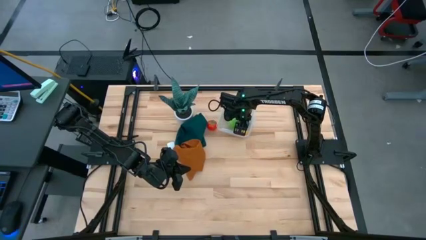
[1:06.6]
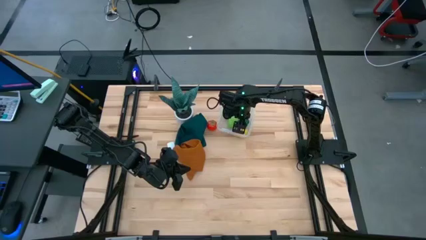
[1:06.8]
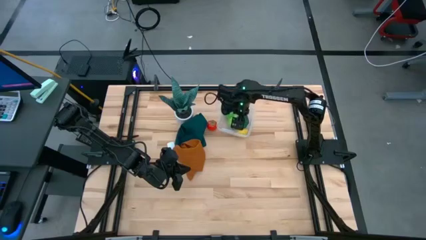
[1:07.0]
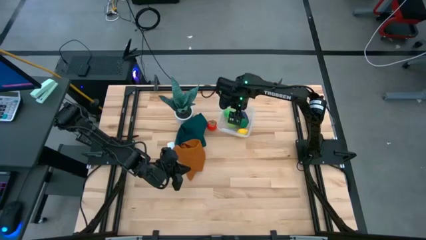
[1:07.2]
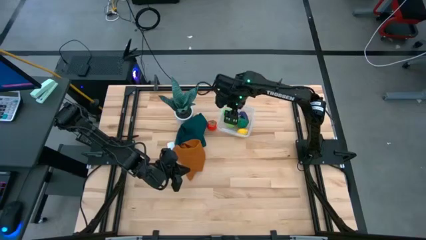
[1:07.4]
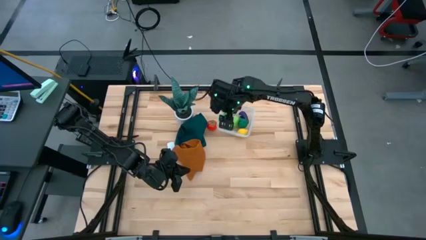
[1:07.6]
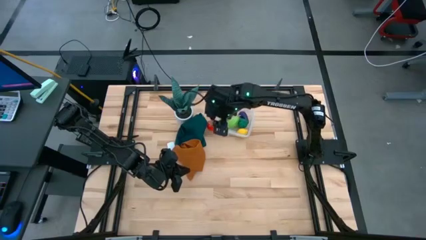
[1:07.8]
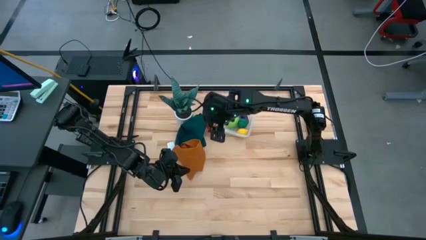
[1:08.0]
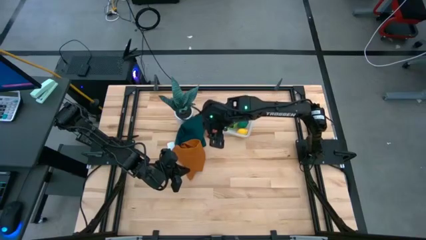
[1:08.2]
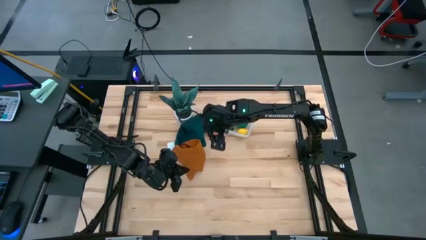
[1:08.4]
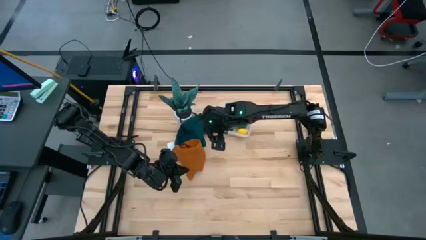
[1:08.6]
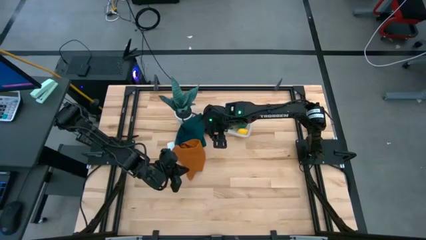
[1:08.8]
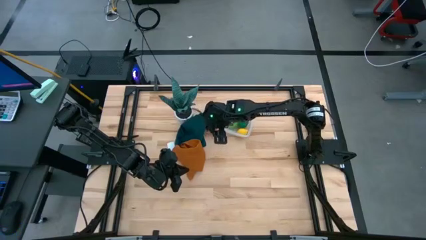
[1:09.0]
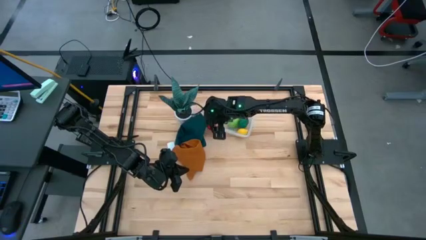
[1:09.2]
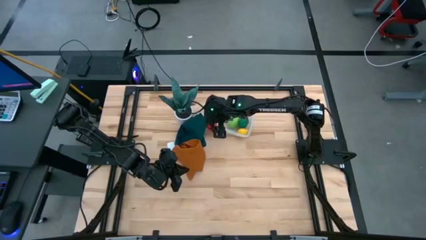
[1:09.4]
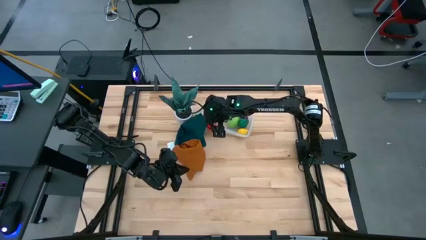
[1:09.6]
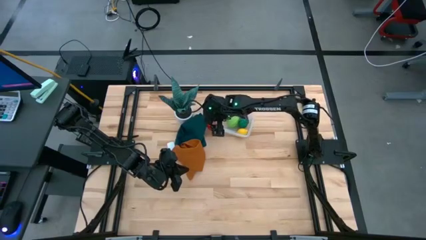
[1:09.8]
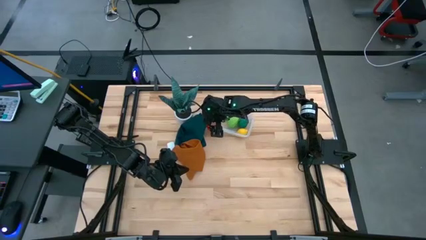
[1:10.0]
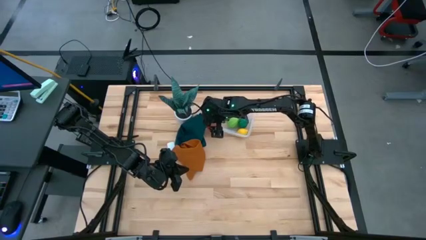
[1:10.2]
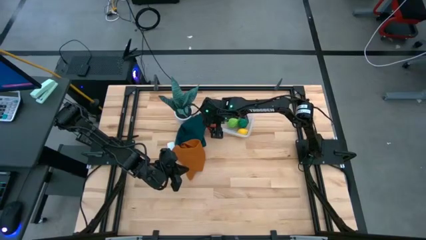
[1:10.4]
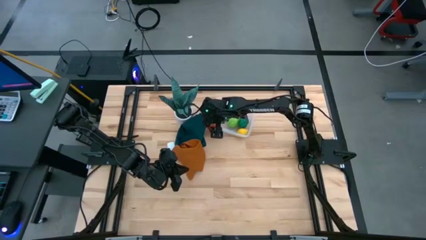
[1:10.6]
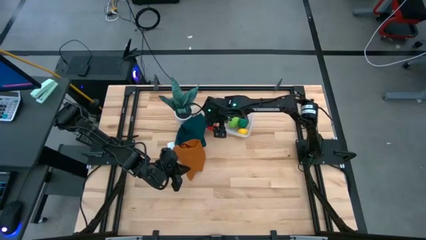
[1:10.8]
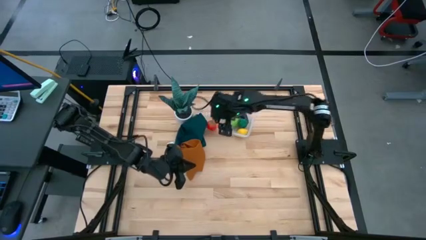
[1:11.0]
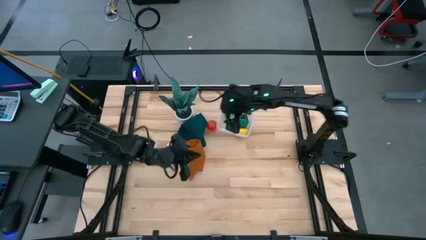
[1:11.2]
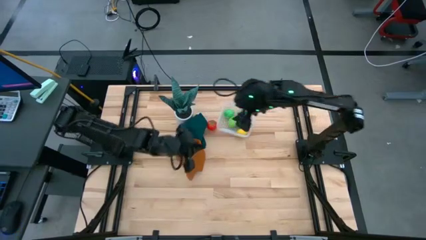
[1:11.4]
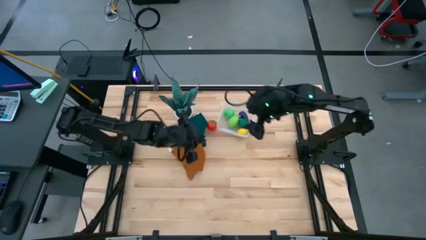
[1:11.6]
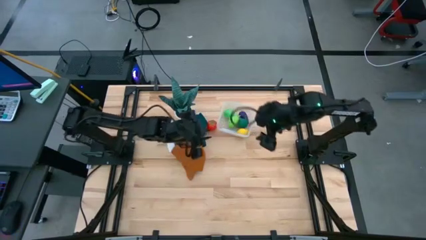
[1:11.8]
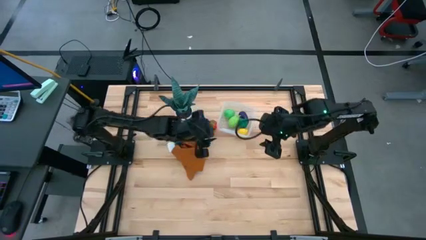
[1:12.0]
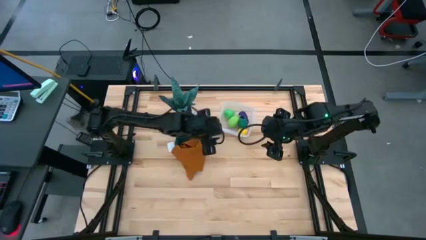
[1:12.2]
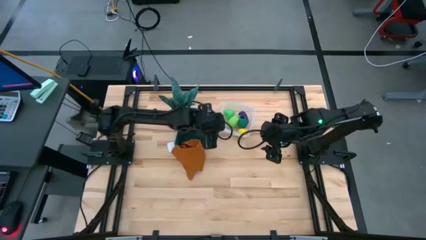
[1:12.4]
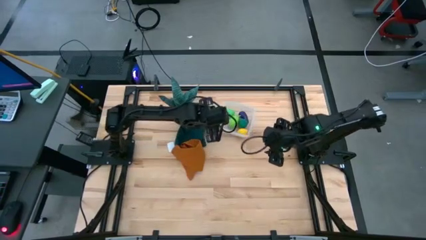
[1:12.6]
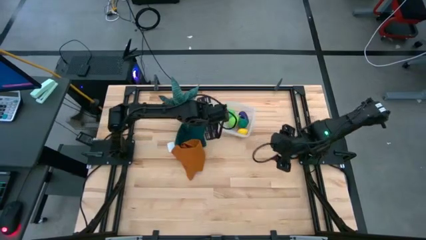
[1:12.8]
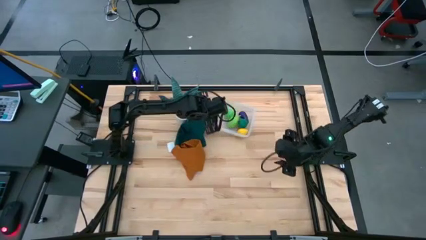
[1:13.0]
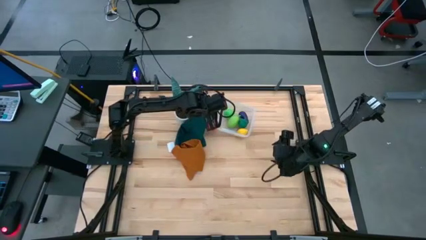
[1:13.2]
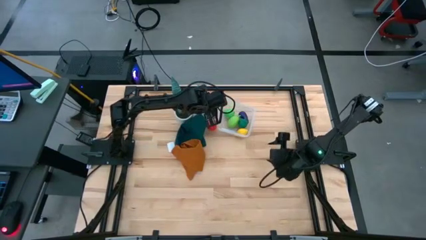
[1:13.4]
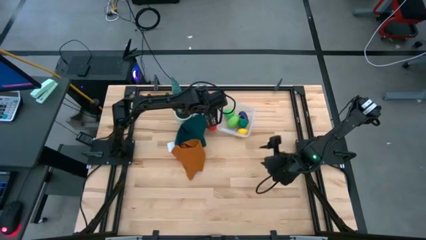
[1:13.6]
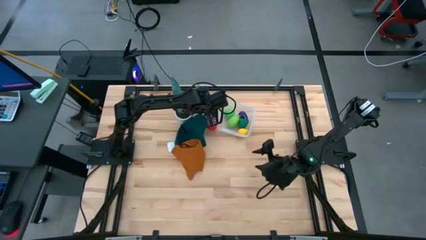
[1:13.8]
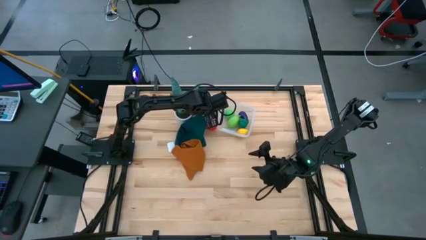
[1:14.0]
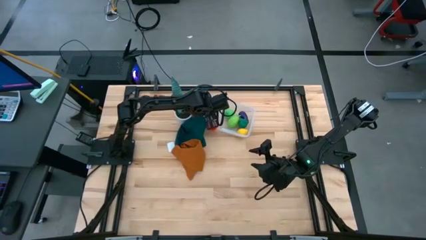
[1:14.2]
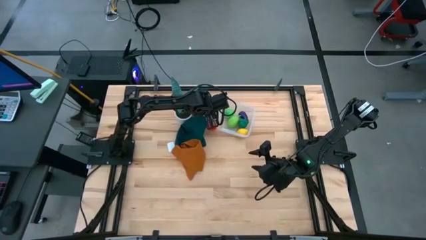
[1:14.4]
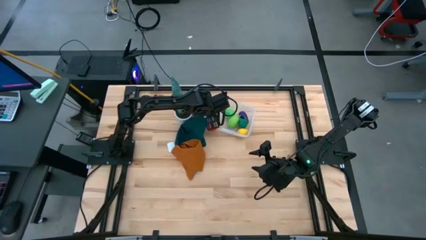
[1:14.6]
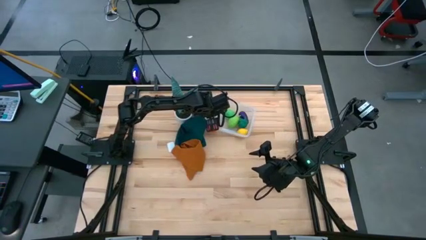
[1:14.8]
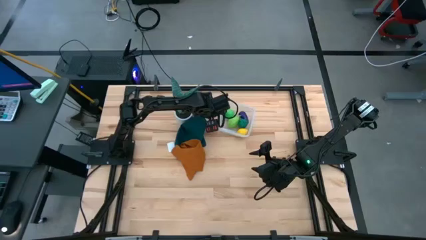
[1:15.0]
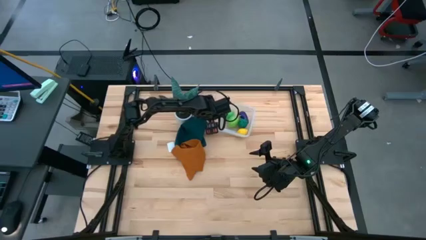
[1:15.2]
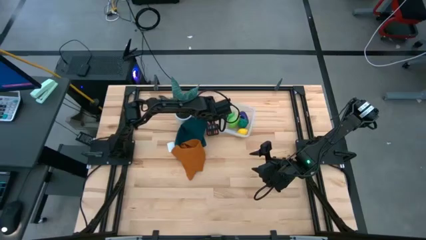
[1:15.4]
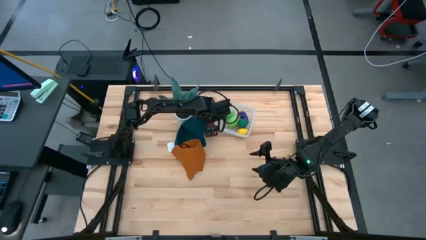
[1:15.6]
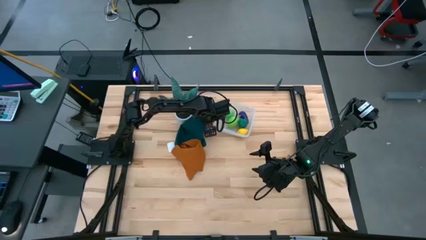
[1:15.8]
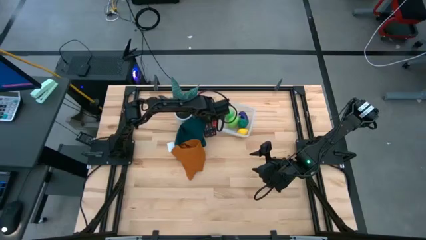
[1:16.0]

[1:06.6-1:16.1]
Task: Pick and placing Produce into tupperware
Put the red tomato into the transparent bin

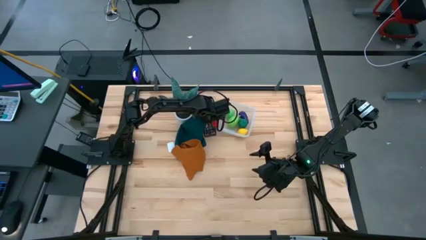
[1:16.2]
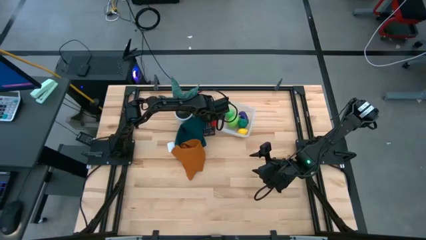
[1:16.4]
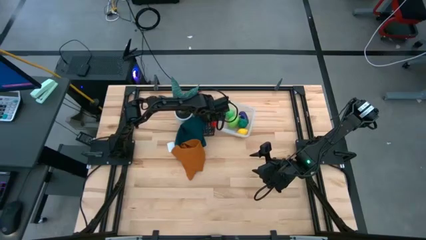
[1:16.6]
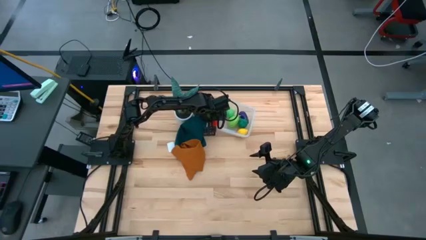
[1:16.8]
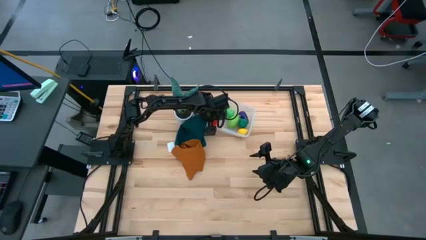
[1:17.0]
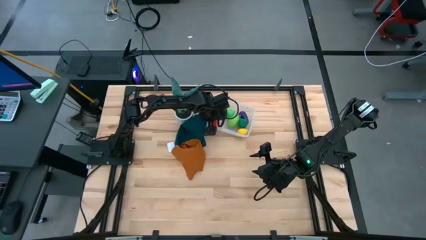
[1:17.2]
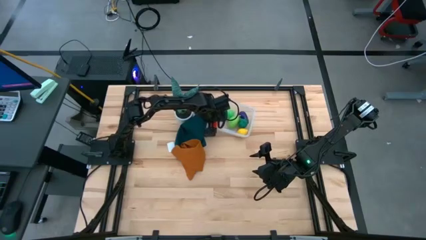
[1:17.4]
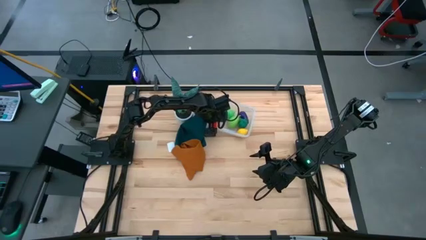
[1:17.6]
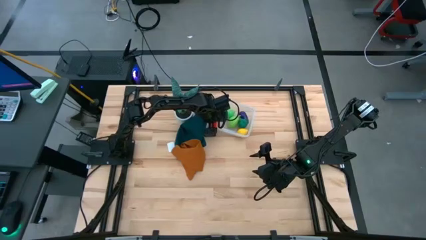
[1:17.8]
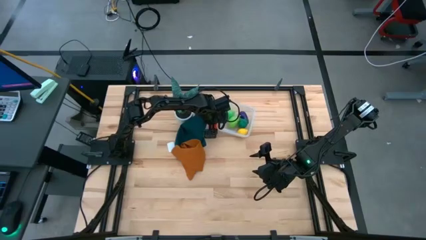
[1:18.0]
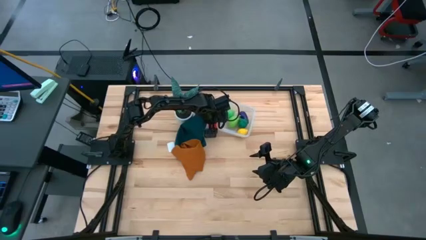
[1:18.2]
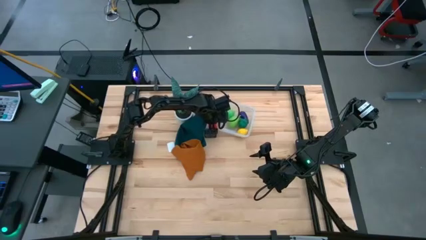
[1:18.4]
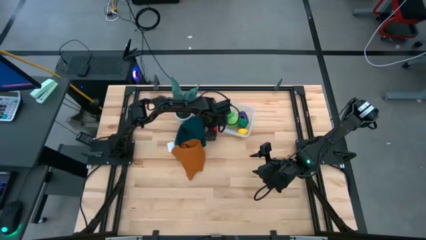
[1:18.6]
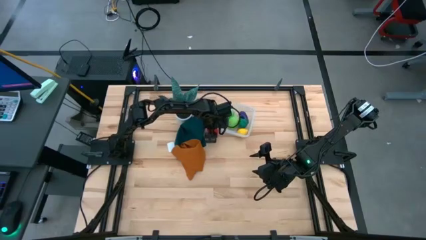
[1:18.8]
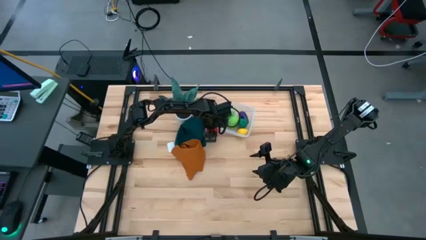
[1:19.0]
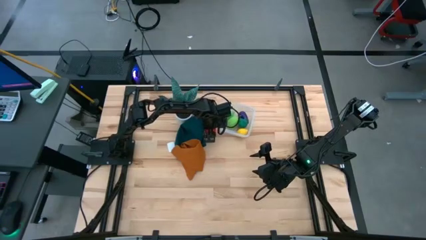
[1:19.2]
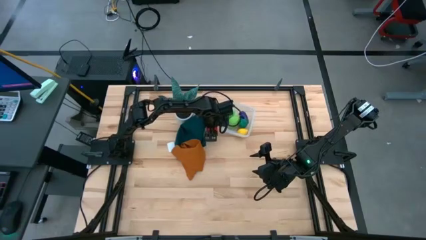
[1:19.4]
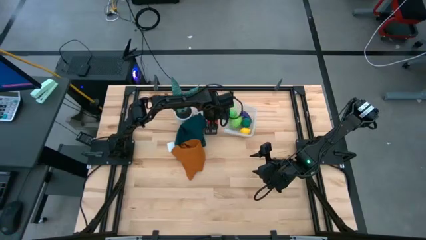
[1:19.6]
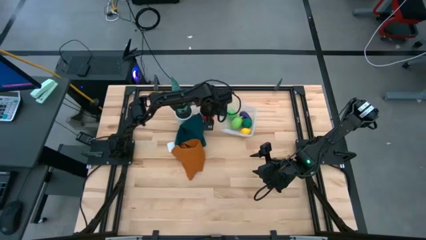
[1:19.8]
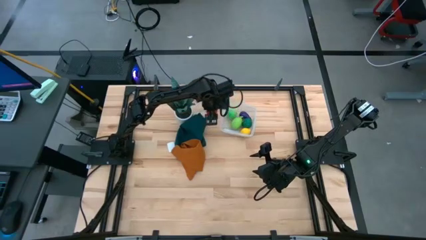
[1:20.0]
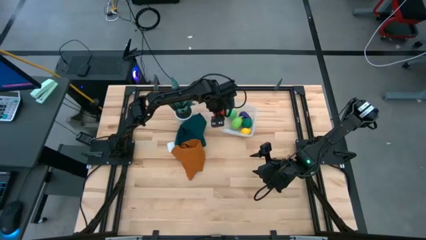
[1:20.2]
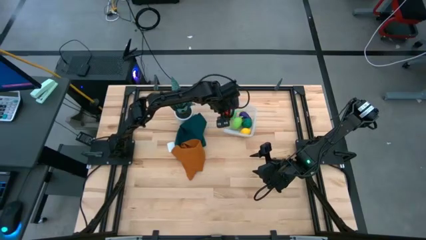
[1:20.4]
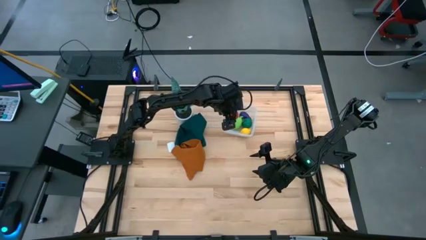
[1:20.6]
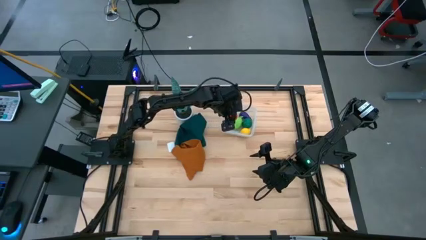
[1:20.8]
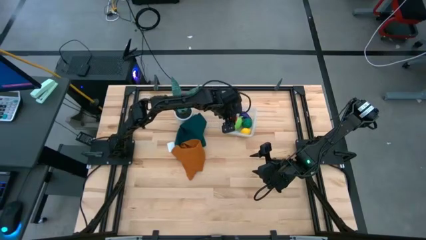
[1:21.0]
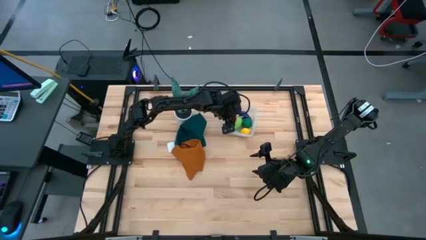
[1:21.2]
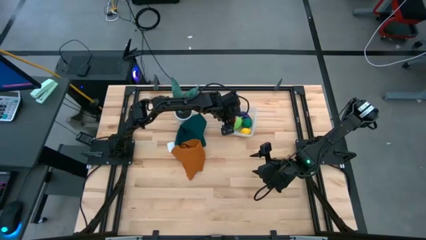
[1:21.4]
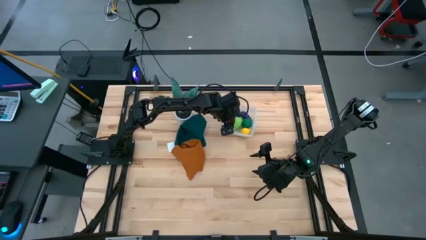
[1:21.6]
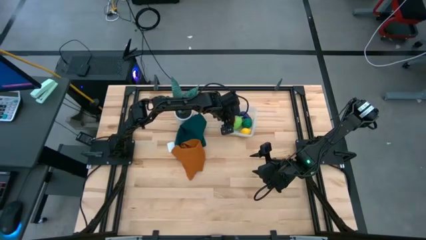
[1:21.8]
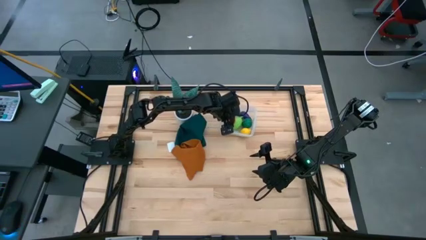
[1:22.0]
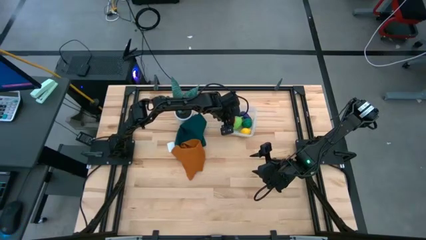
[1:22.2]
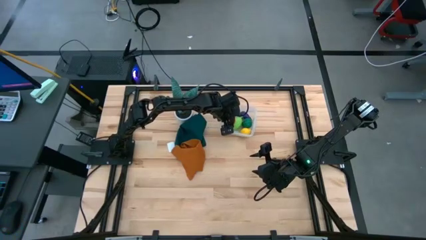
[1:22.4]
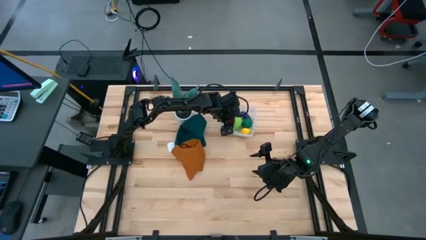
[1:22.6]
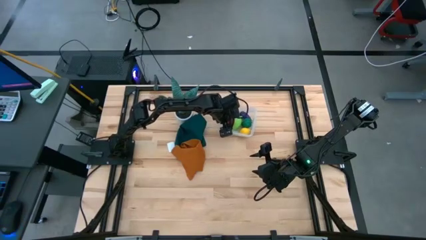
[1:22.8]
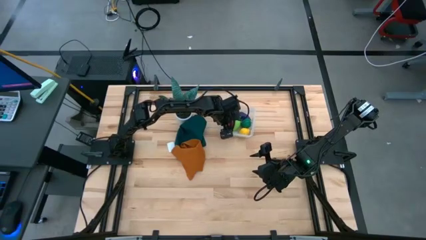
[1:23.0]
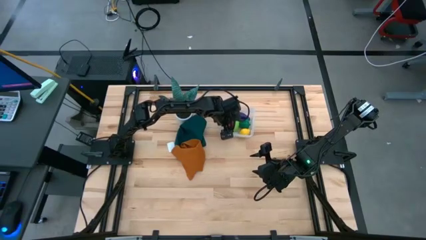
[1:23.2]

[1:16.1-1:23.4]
Put the red tomato into the transparent bin
